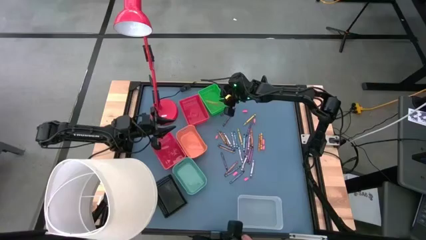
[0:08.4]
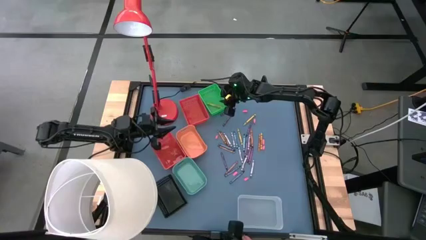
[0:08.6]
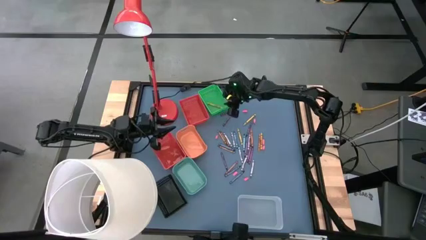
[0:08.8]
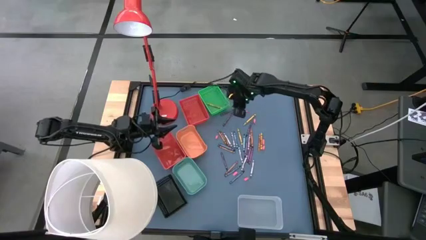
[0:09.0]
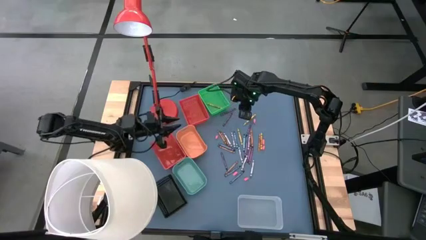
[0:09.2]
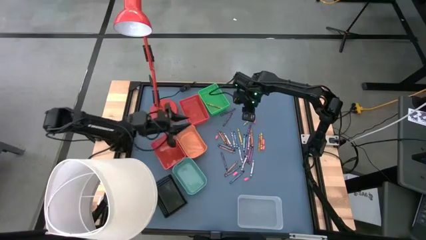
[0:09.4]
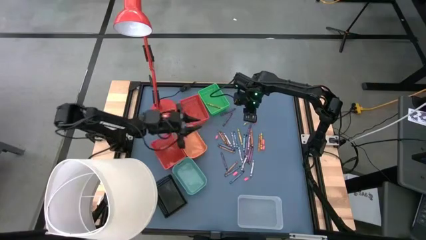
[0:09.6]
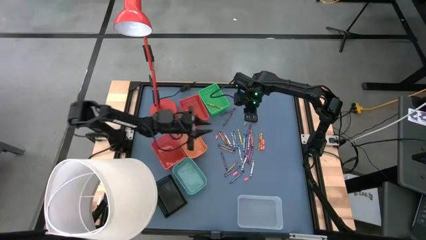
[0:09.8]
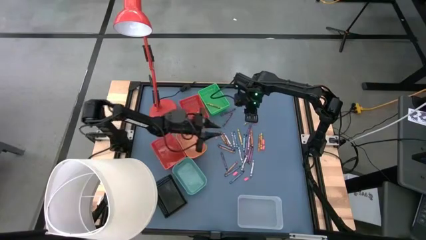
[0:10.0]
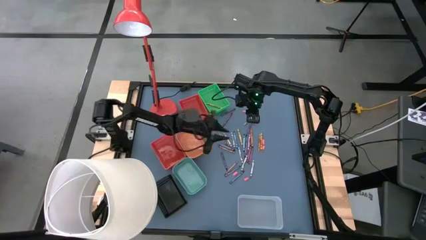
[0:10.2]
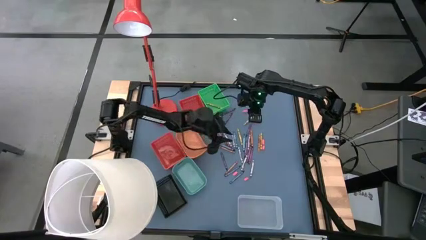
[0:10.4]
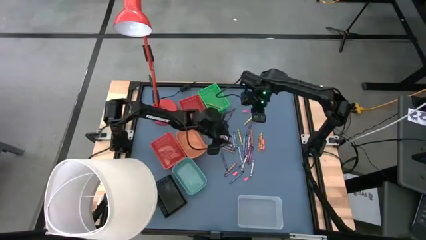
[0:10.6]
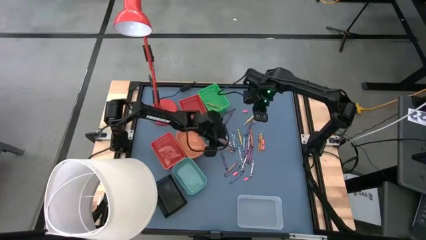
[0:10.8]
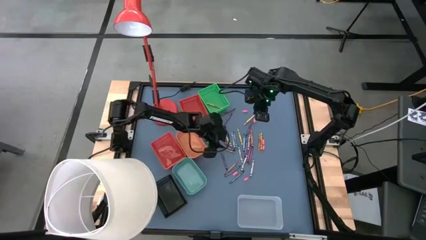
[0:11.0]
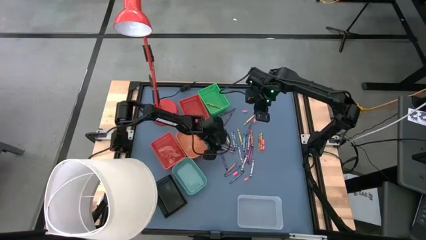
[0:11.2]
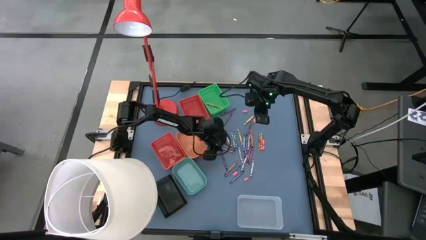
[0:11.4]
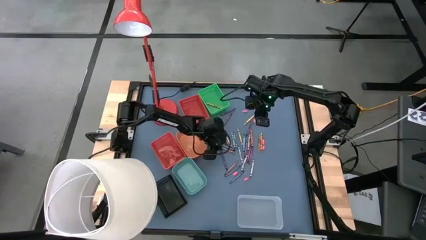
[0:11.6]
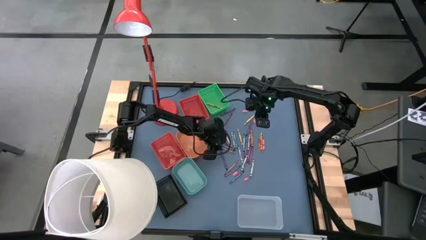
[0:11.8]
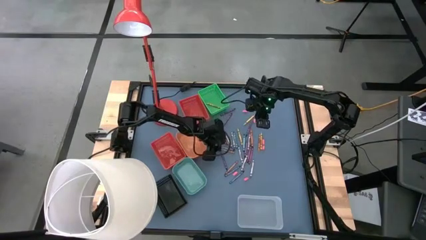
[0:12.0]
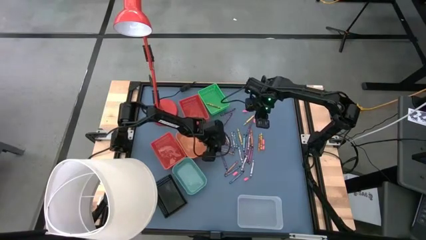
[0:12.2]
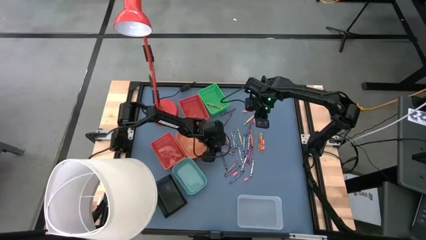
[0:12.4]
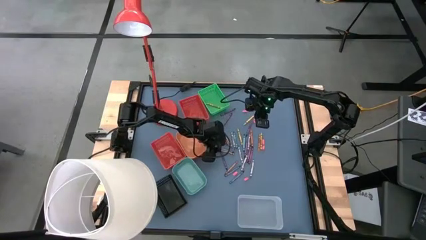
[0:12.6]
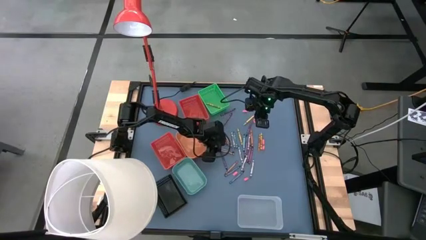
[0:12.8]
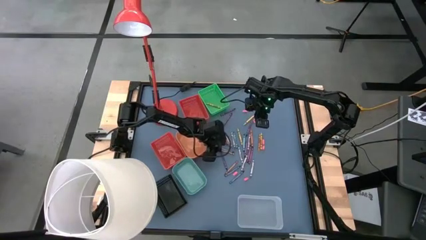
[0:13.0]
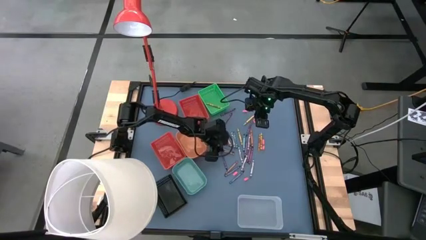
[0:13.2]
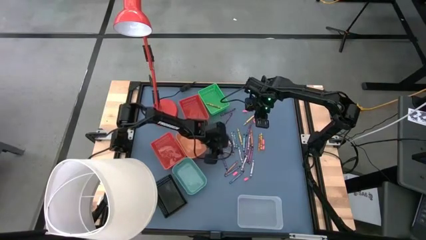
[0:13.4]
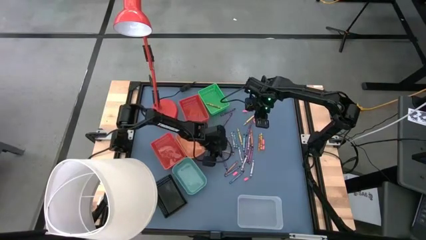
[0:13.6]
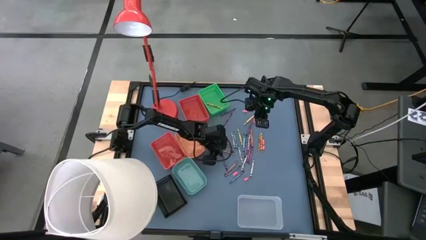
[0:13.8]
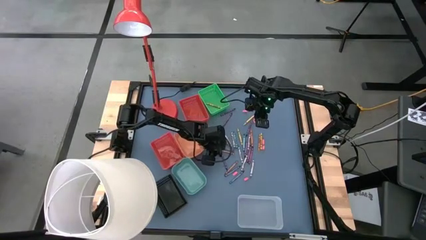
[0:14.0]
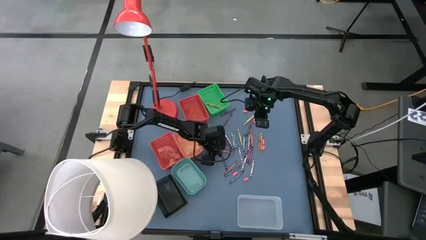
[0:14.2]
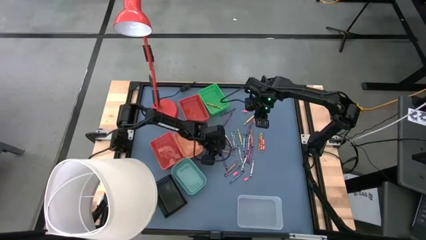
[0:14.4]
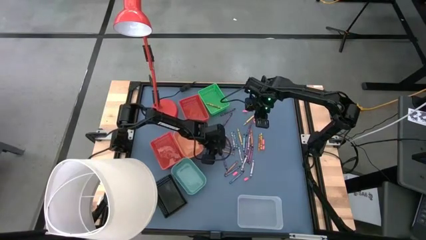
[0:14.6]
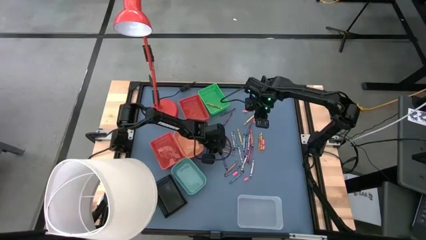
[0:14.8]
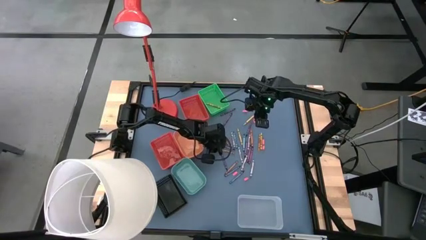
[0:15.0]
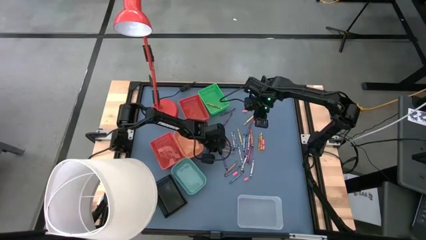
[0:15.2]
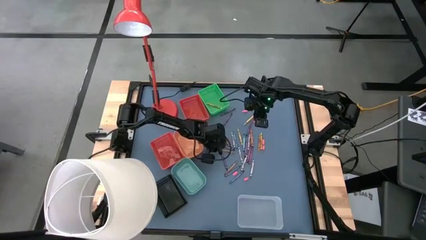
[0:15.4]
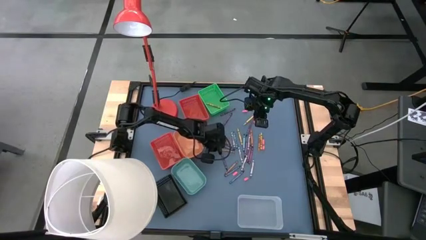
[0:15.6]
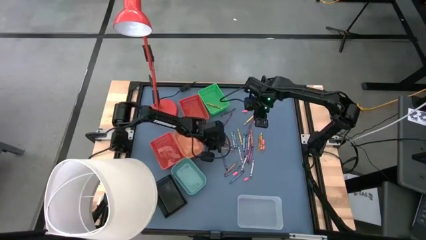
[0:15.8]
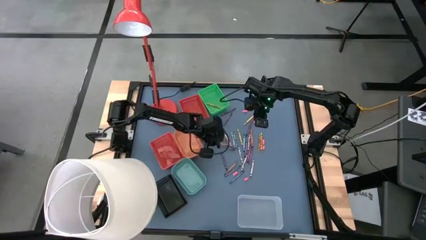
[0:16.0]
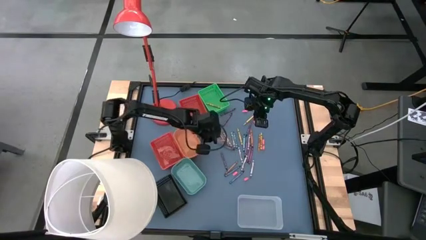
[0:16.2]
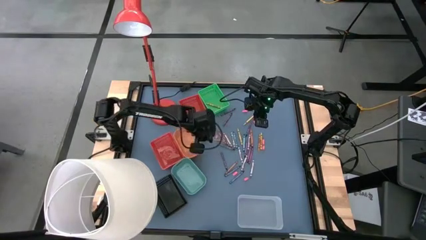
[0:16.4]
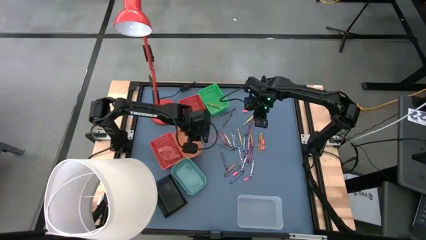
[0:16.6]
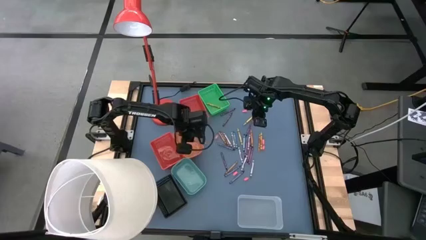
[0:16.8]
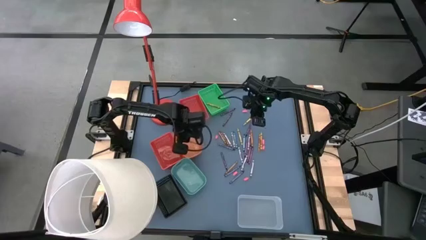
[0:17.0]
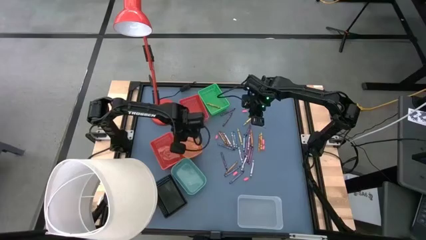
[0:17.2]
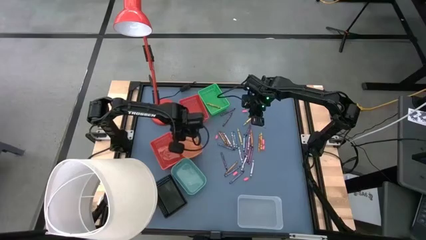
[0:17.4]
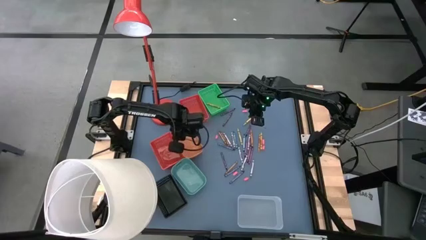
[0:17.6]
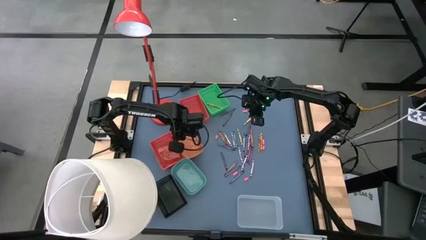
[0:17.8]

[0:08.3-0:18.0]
Task: Sort crayons
Put the brown crayon into the orange bin

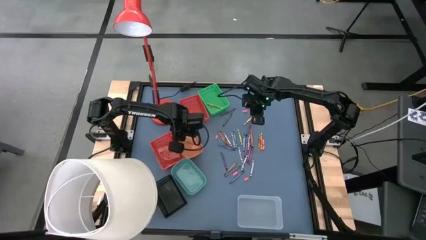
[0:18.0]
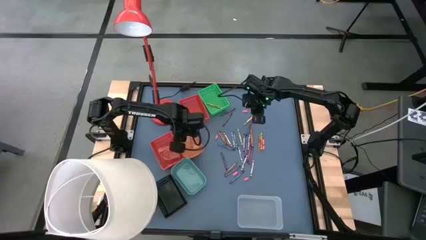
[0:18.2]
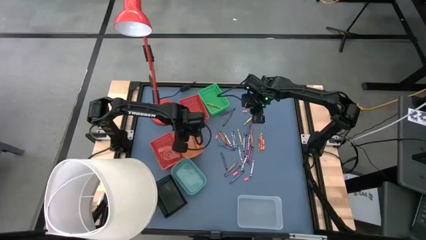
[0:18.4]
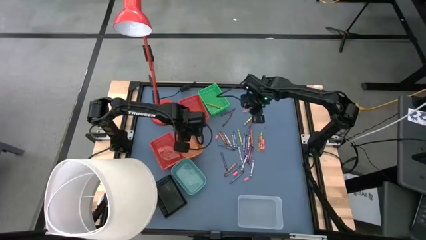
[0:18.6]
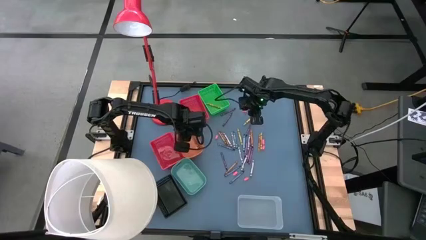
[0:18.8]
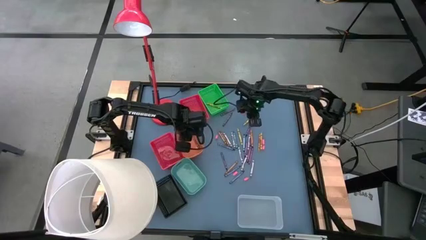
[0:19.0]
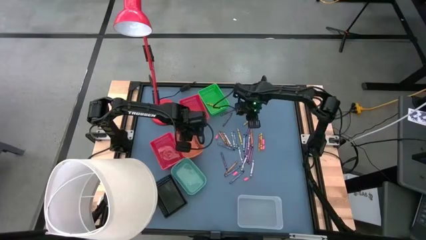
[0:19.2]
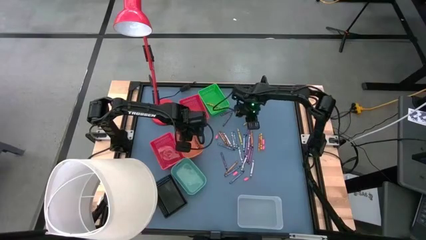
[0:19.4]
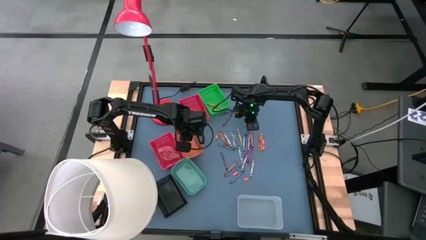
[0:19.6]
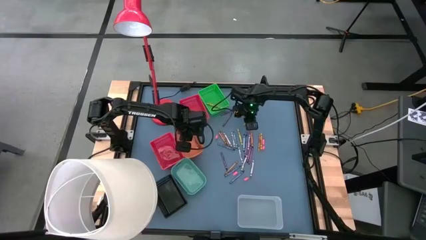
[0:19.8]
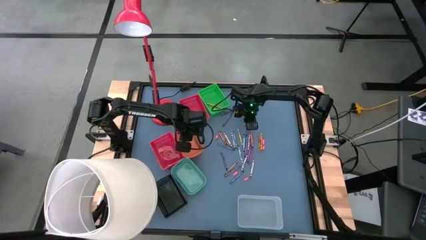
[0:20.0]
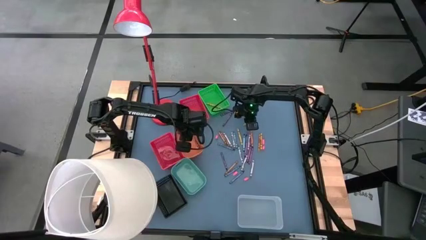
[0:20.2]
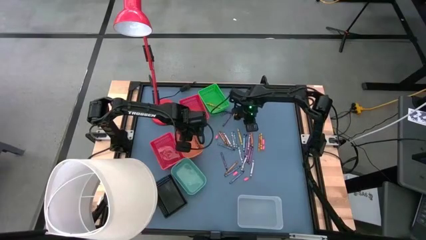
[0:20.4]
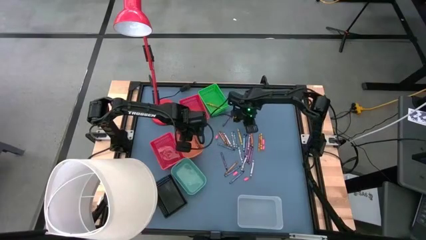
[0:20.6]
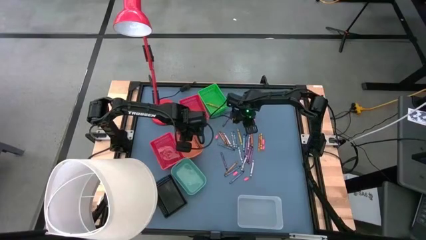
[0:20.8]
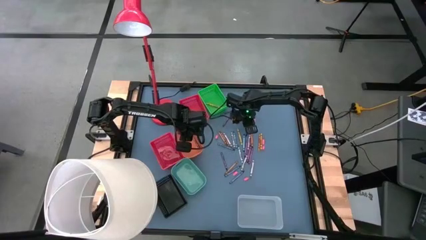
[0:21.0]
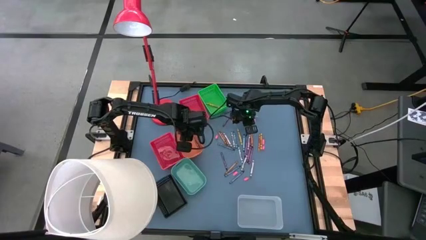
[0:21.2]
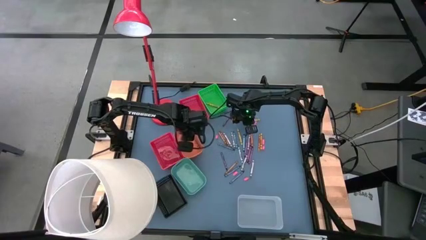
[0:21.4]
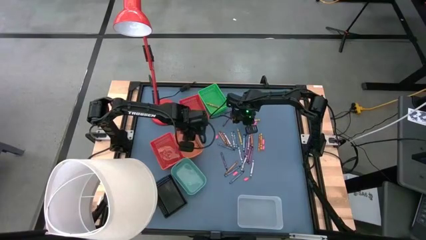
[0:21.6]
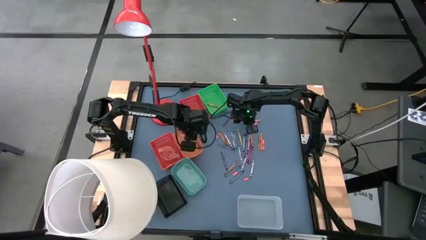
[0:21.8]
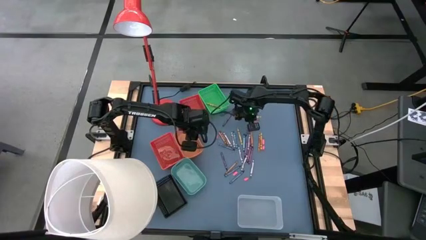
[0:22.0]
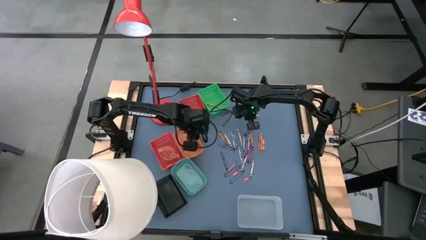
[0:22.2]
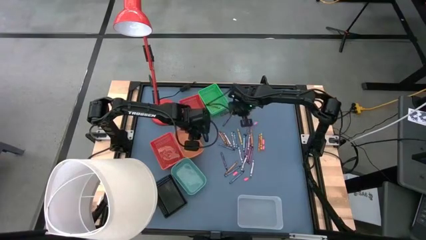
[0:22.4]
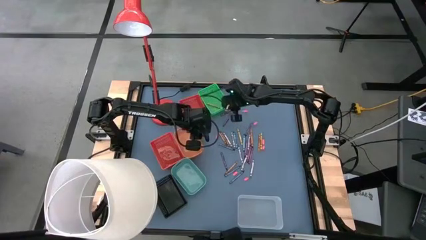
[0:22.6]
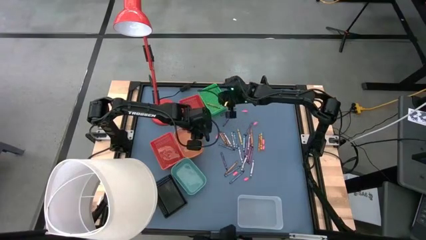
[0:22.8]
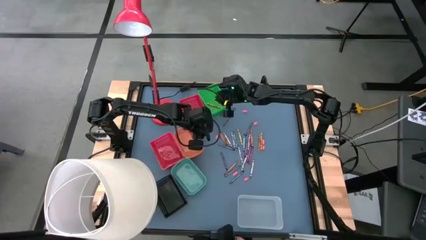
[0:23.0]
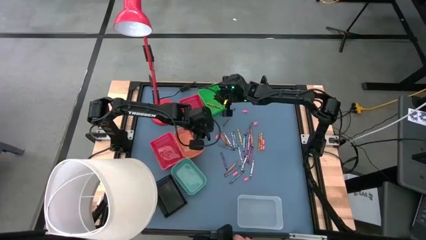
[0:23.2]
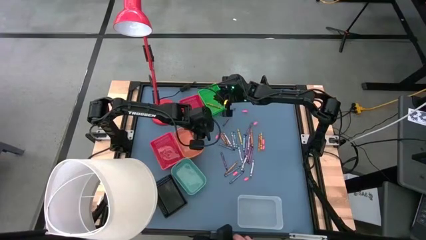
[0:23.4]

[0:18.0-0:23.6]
Put the yellow crayon into the green basket
